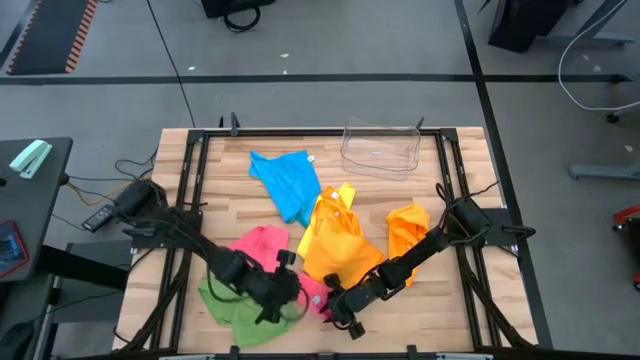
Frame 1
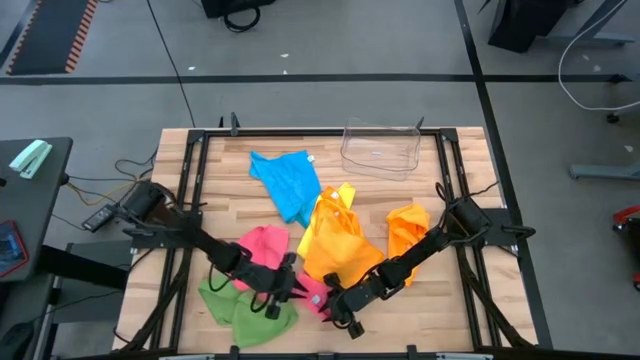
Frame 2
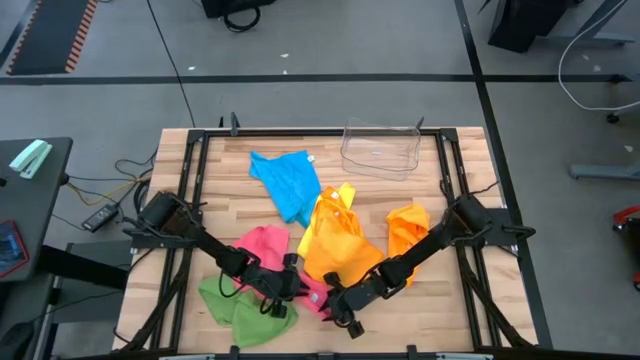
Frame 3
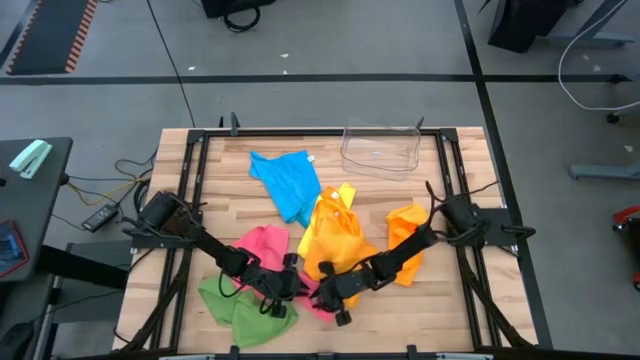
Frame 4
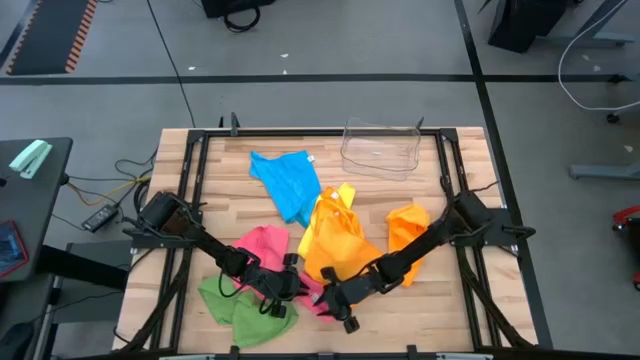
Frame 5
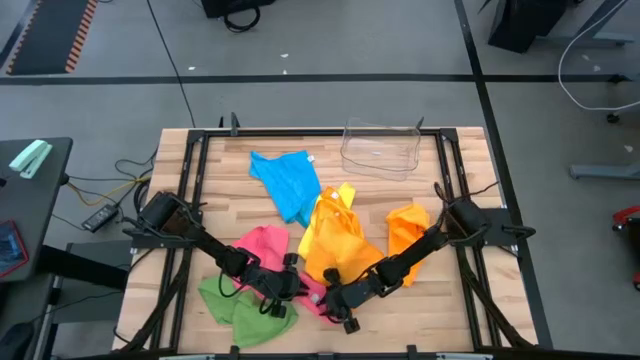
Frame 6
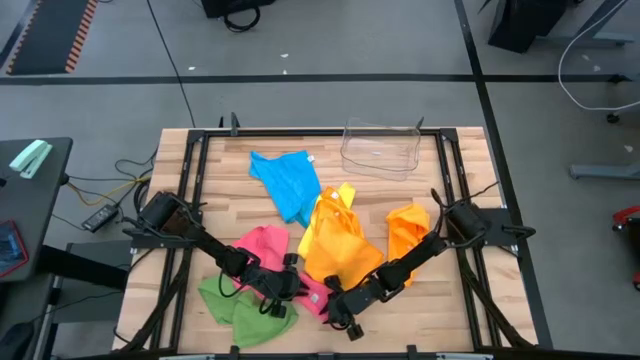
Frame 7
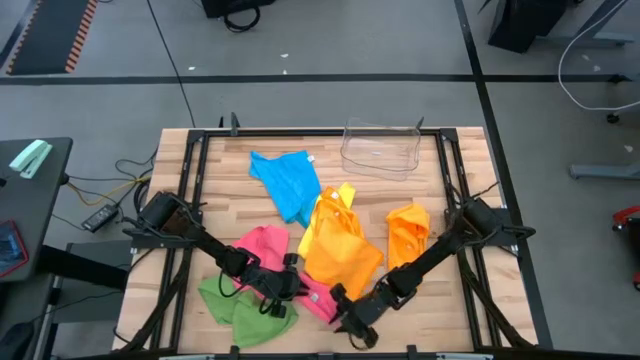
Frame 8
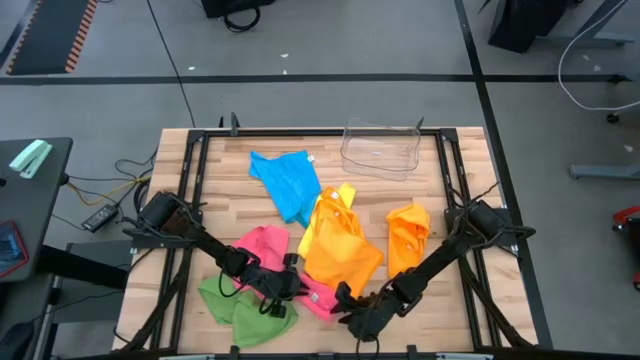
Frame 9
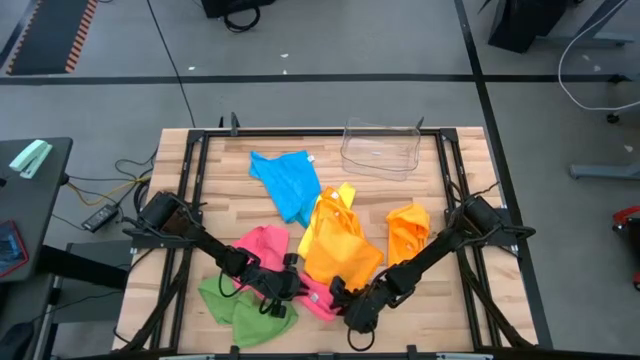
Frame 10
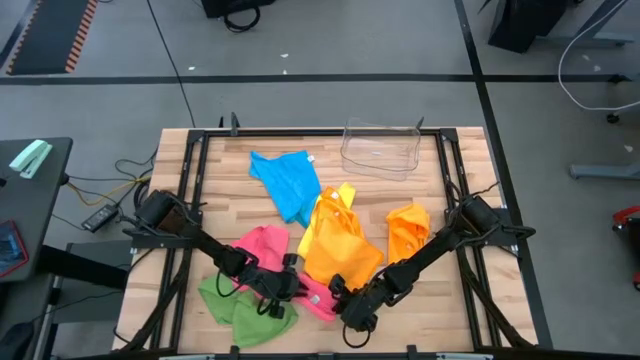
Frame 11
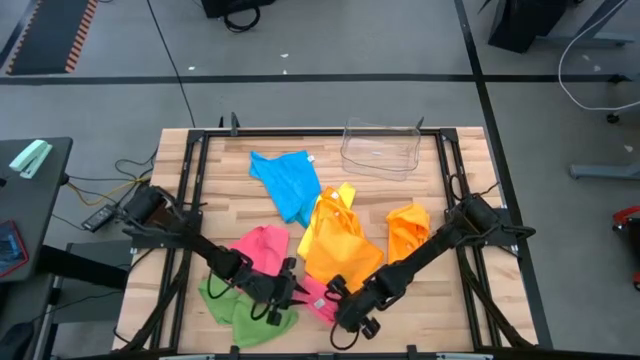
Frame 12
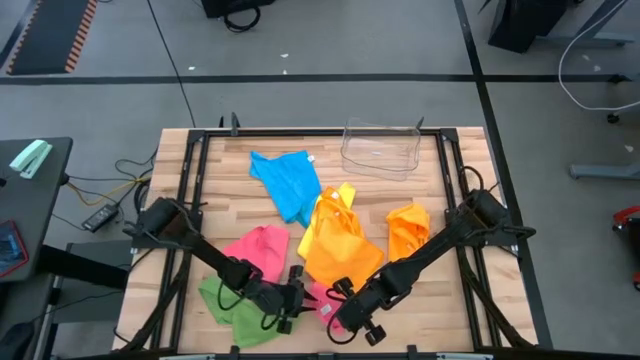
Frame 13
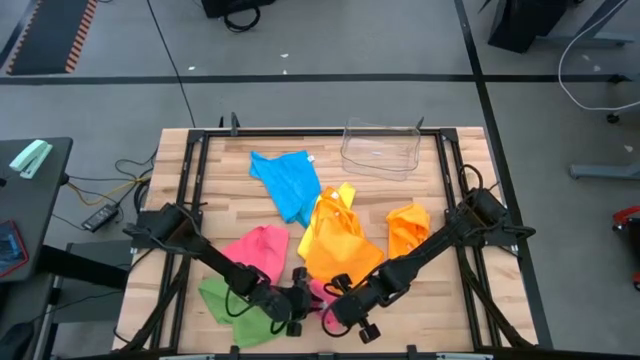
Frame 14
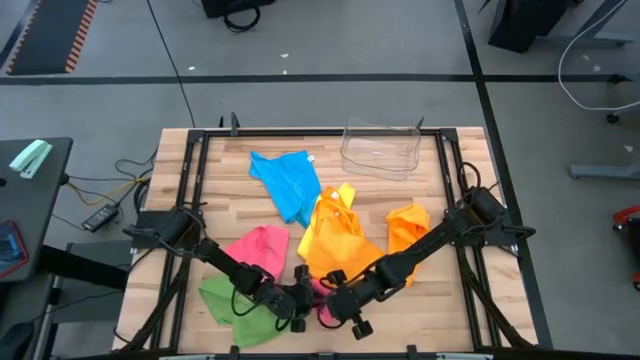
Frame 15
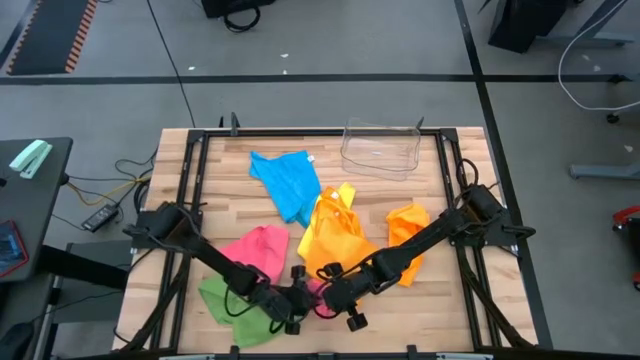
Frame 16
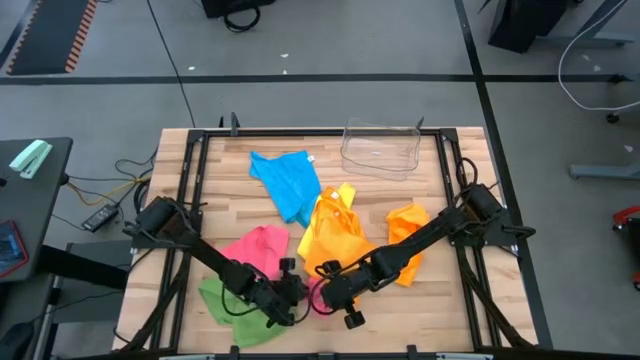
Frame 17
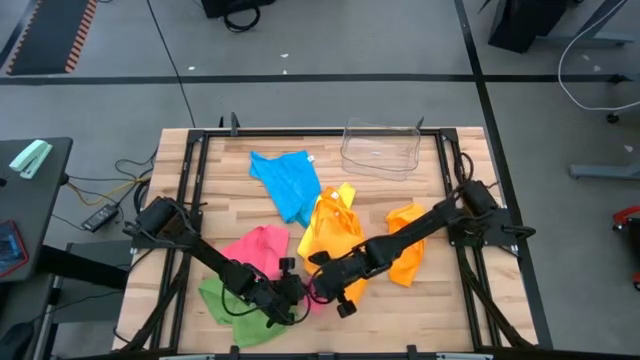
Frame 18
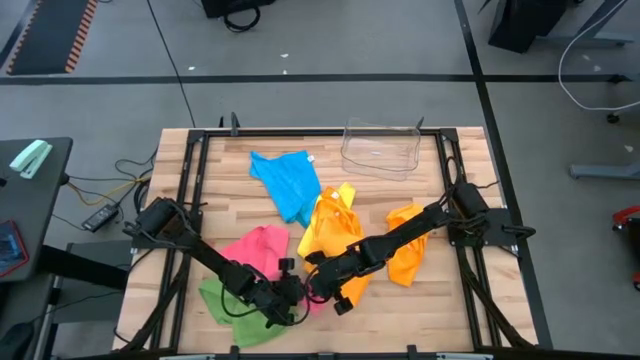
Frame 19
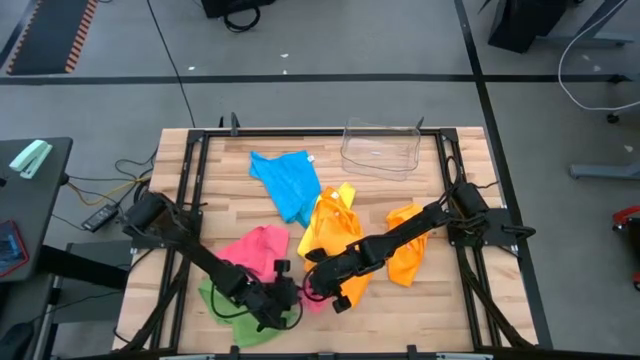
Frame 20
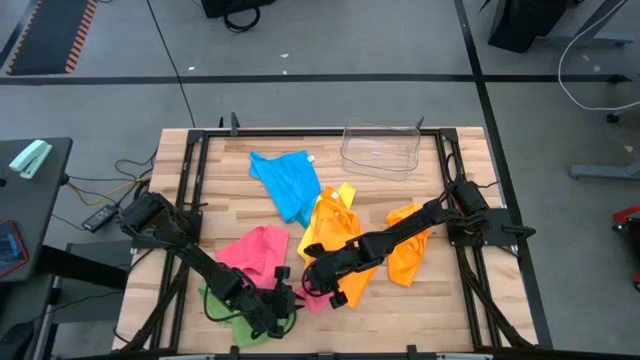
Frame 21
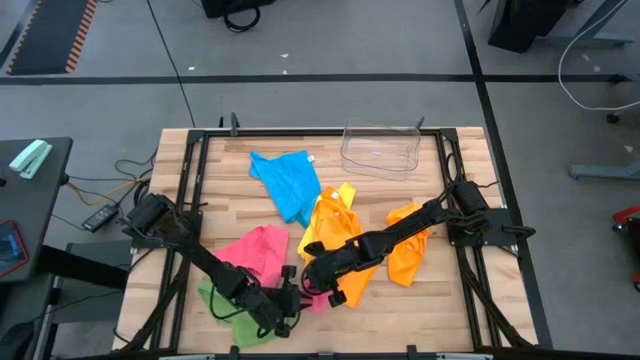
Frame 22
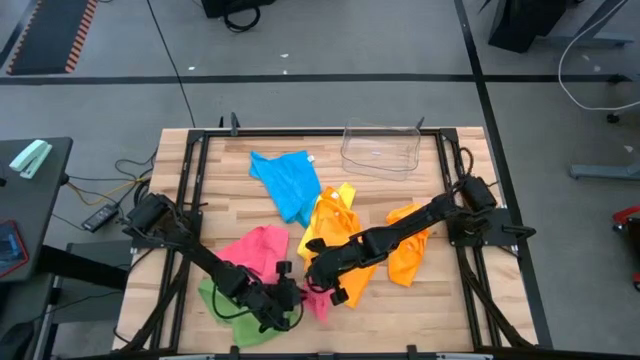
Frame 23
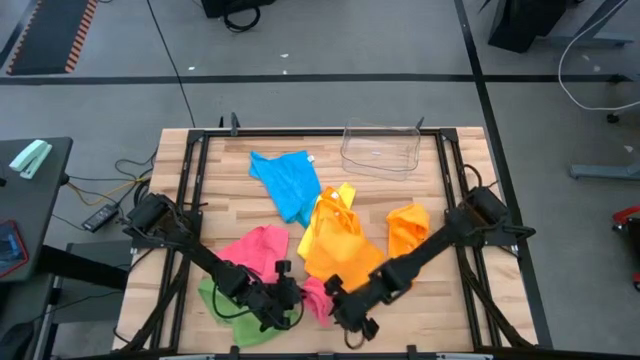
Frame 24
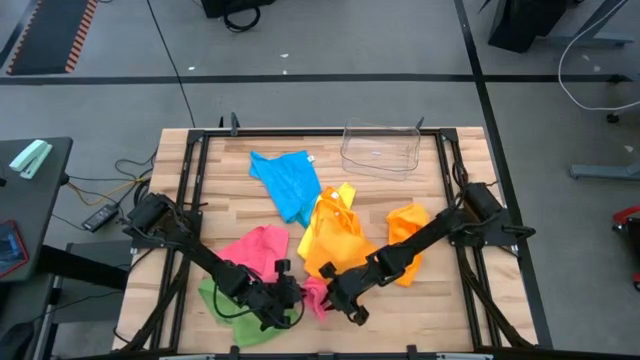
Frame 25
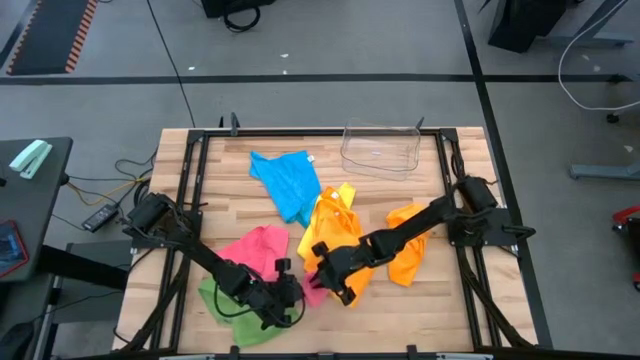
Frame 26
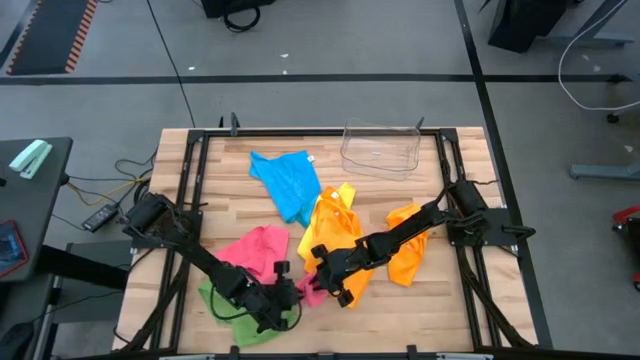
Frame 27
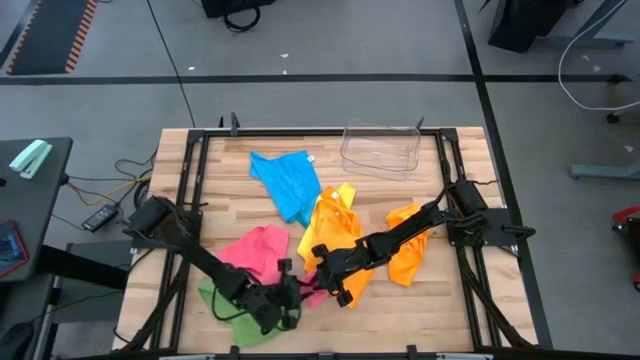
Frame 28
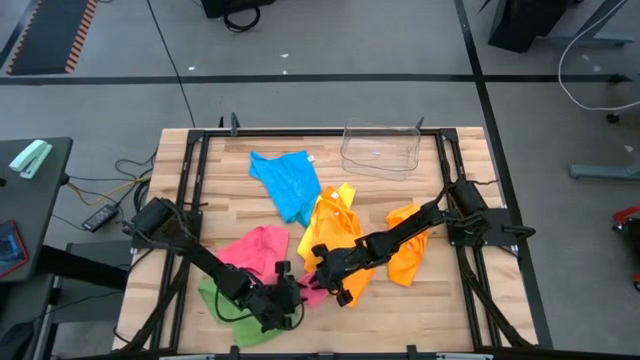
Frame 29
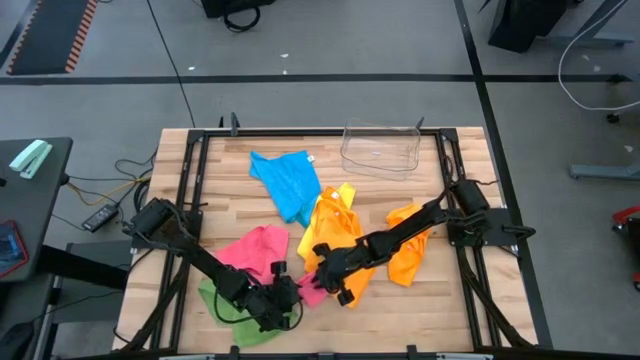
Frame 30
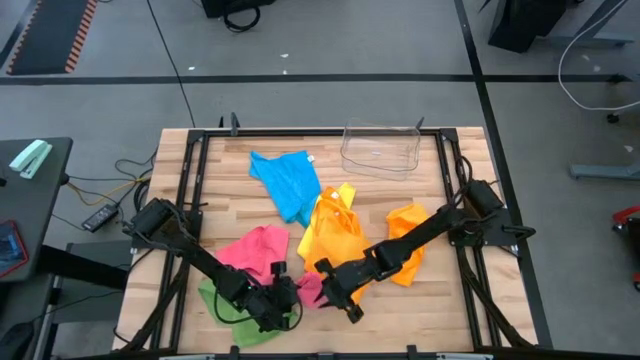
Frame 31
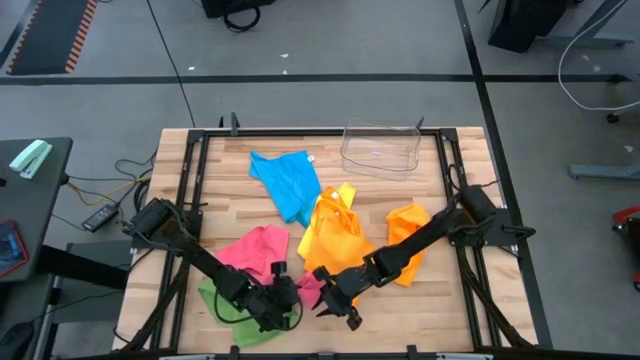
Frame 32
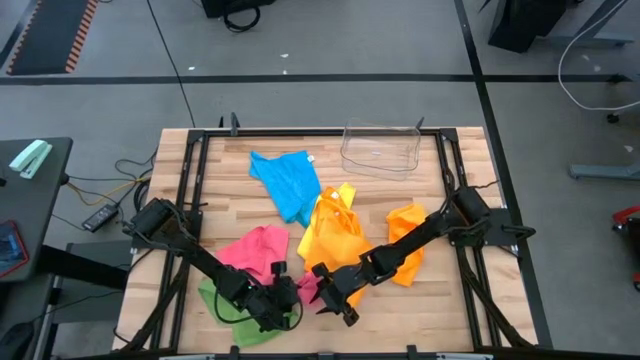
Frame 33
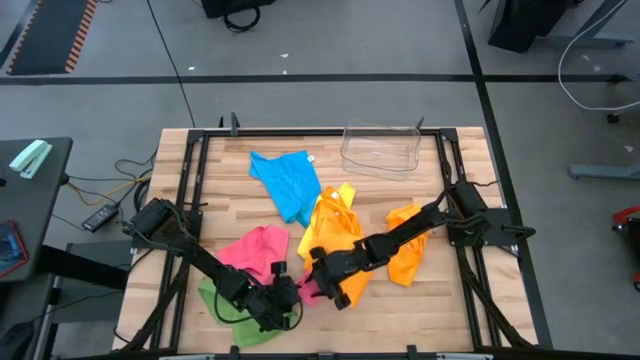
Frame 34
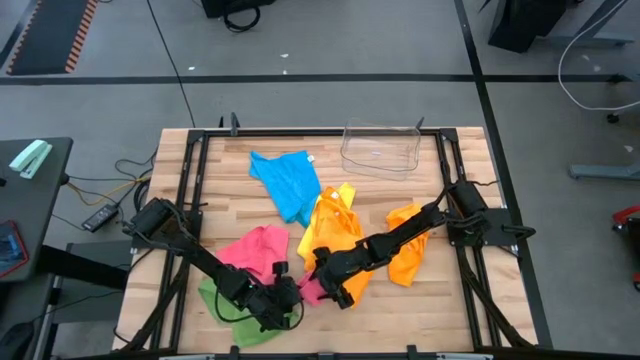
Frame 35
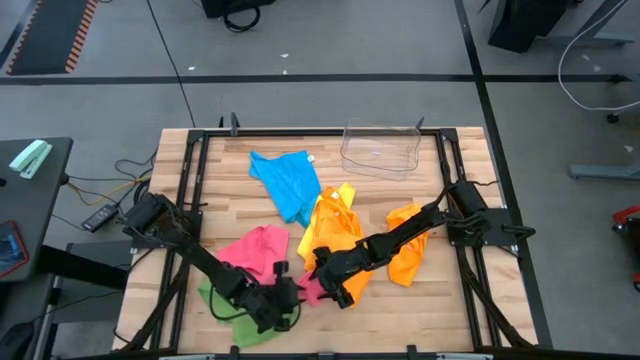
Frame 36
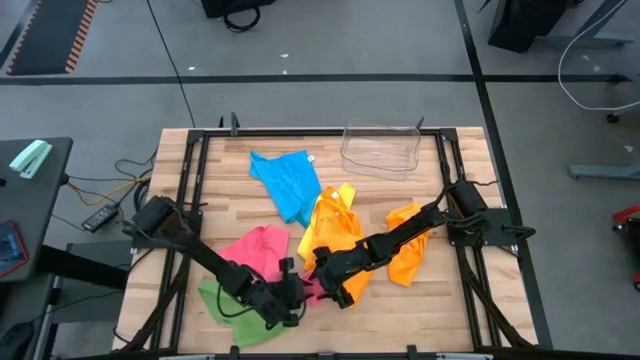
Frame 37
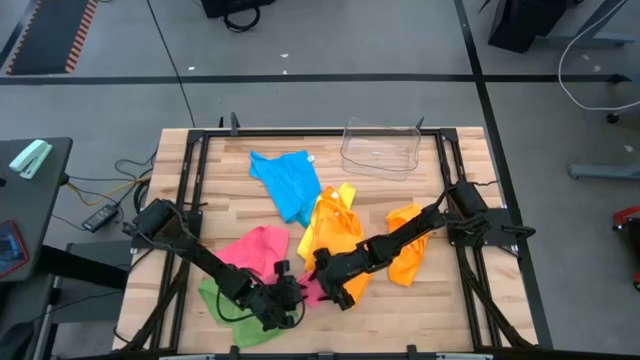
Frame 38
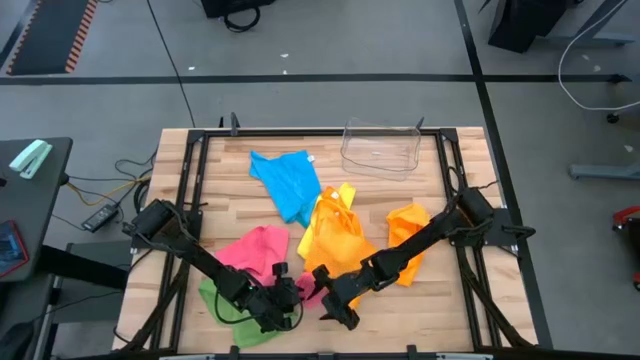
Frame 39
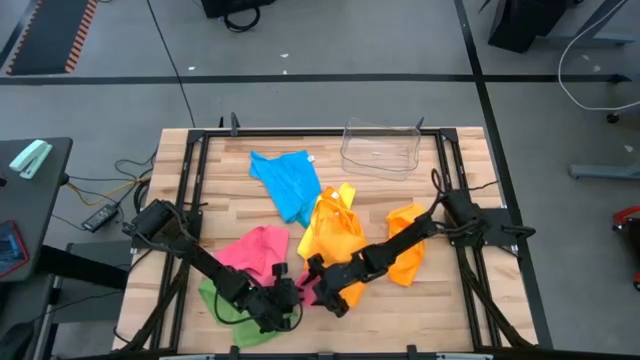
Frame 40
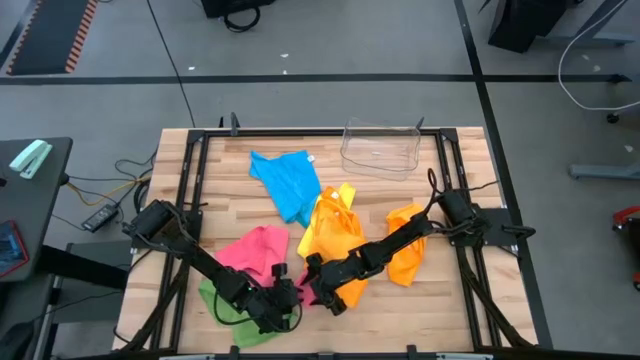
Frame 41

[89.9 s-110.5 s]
Task: Fold microfiber towels
Fold the top pink microfiber cloth
